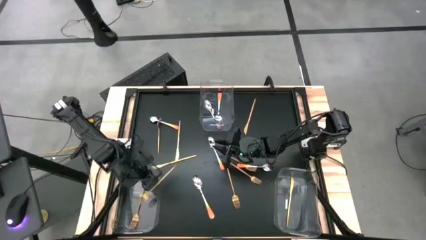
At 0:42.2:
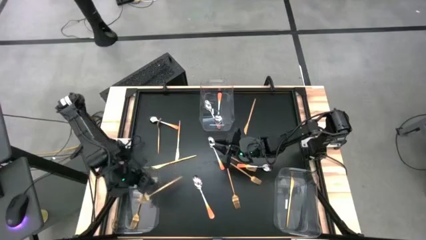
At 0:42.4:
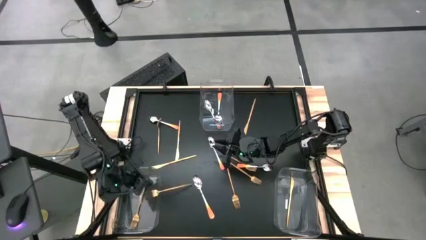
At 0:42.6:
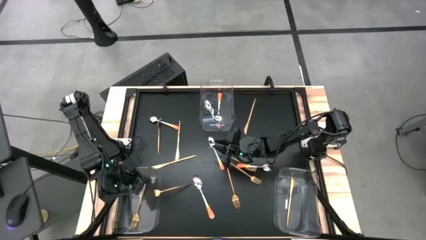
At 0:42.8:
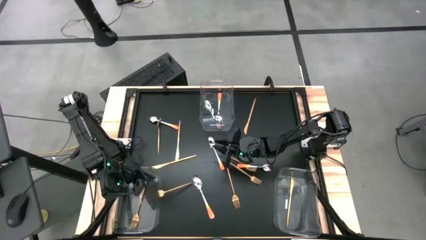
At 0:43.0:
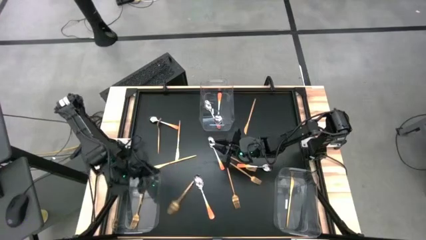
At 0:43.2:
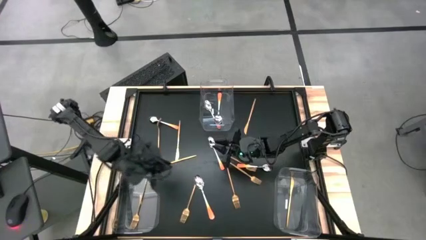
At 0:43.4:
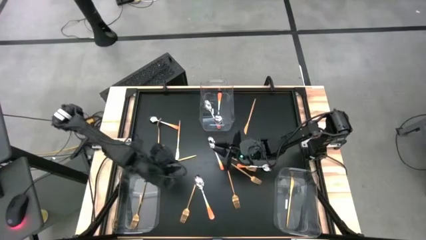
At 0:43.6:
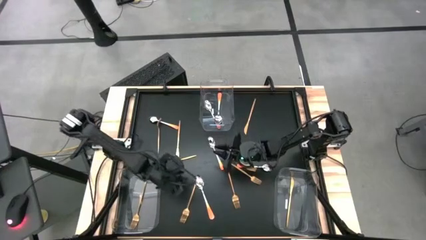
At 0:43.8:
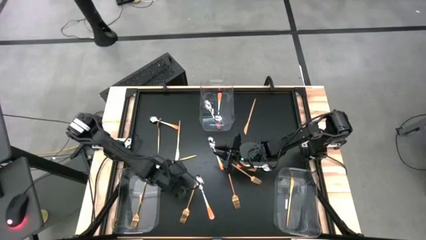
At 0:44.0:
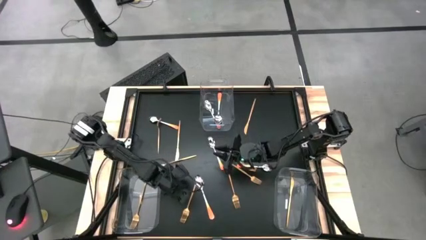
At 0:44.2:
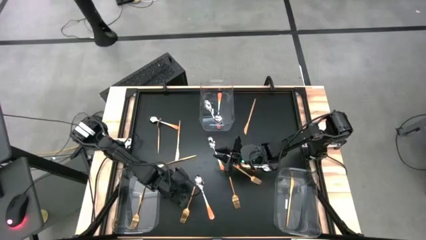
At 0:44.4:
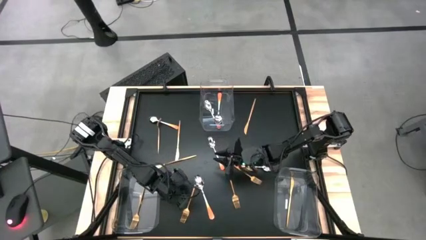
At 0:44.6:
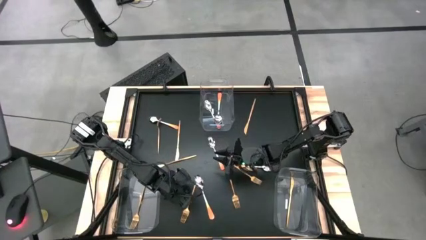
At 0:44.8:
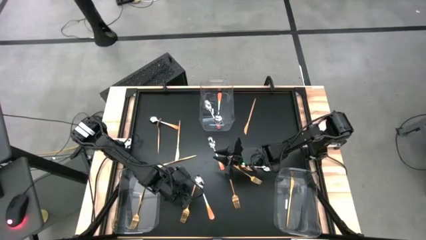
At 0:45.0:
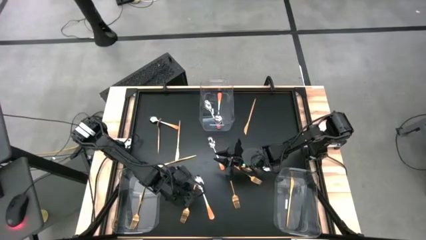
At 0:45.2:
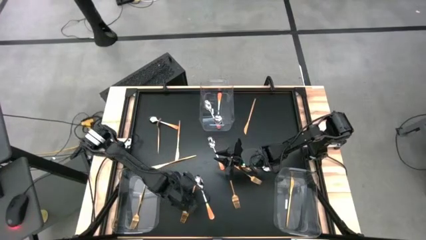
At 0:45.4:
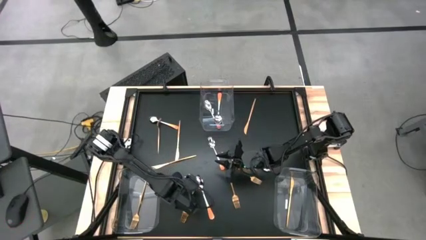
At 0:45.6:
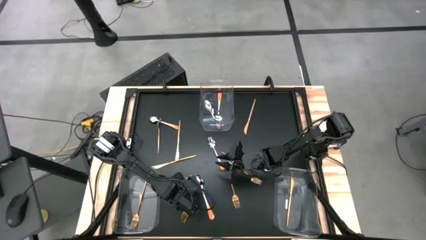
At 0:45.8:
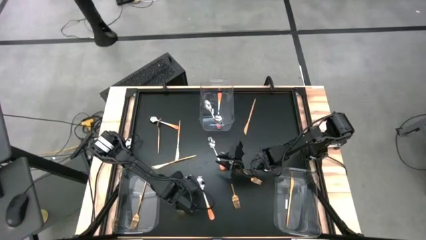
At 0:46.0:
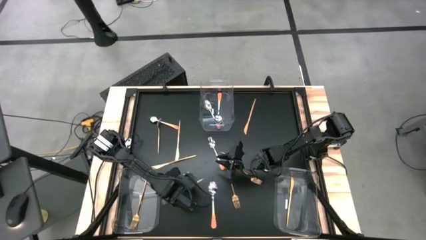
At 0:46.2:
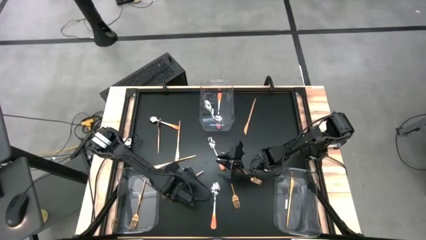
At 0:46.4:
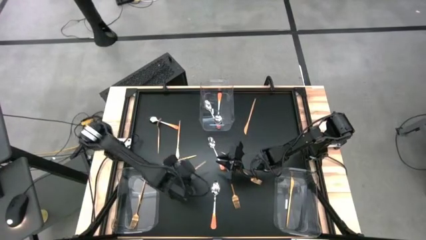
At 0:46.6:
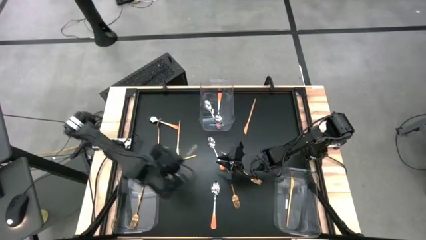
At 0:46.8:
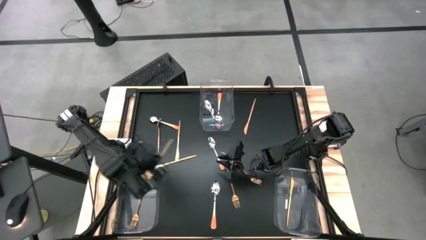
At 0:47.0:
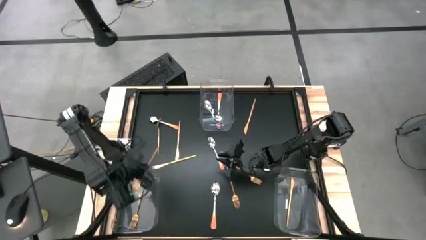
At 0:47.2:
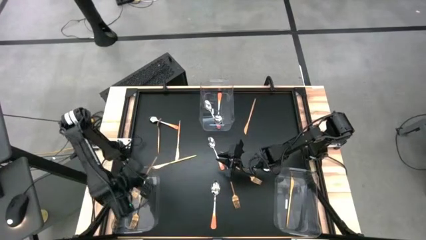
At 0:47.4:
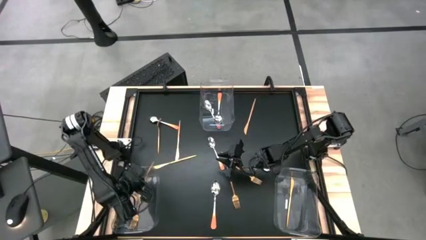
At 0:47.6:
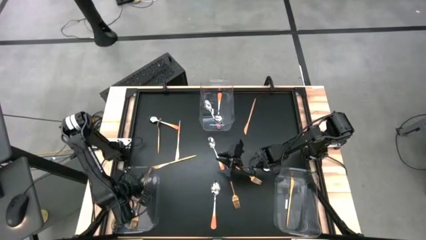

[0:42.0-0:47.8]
Task: Sort silverware by color (type)
Put the gold fork into the bottom left transparent bin

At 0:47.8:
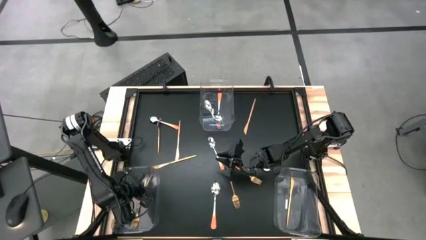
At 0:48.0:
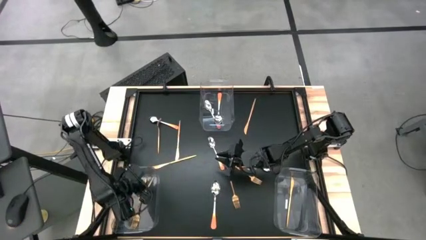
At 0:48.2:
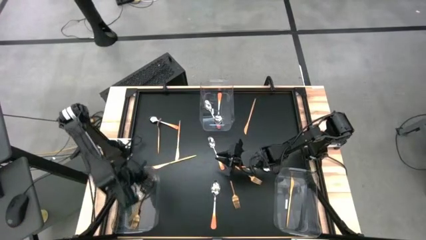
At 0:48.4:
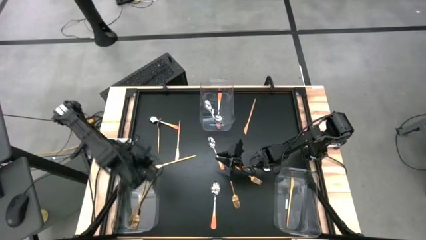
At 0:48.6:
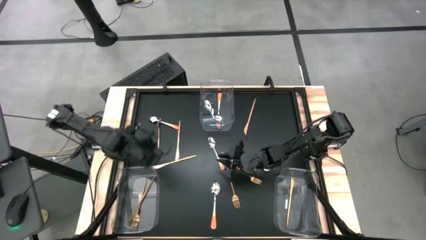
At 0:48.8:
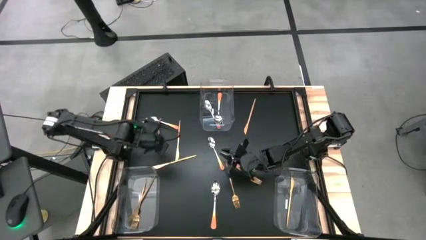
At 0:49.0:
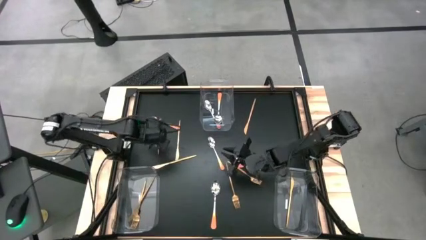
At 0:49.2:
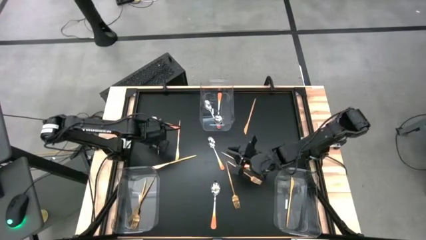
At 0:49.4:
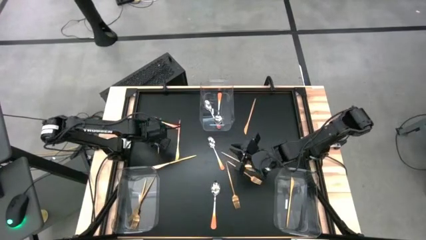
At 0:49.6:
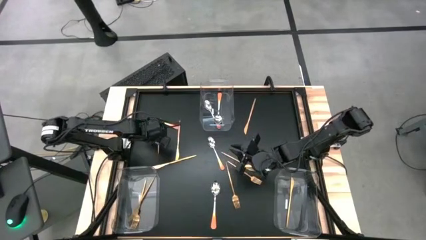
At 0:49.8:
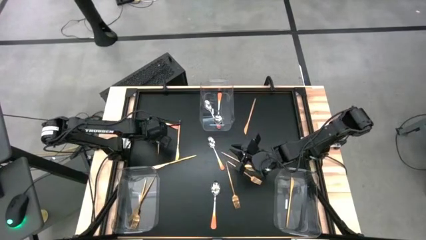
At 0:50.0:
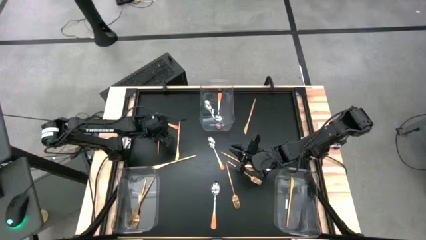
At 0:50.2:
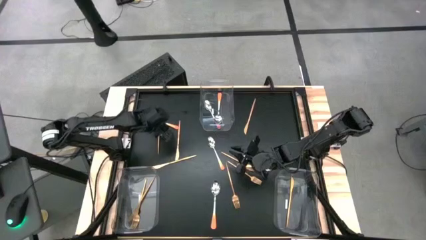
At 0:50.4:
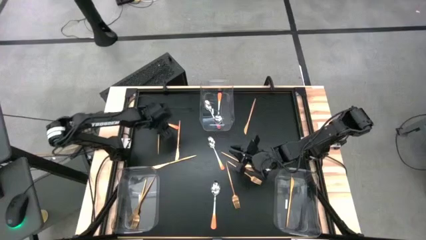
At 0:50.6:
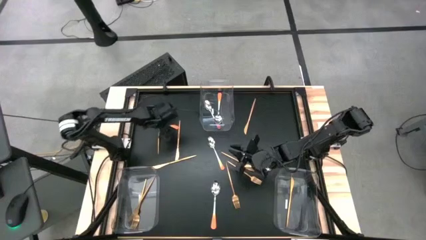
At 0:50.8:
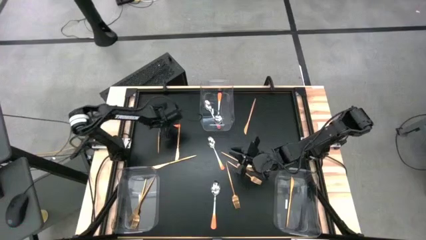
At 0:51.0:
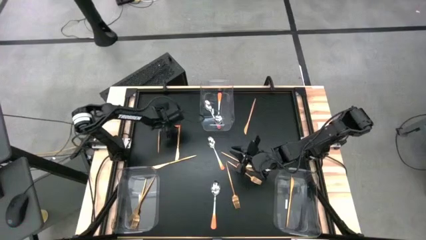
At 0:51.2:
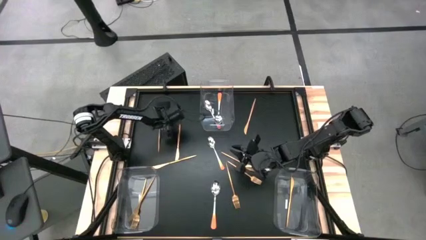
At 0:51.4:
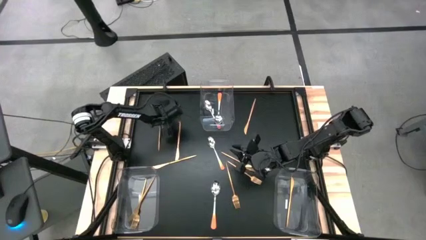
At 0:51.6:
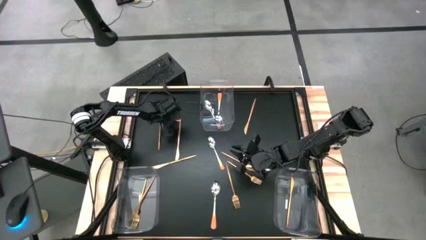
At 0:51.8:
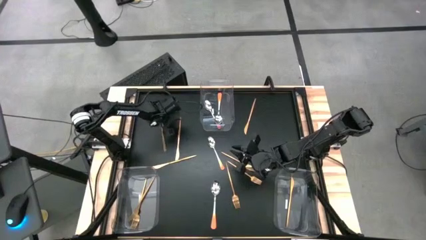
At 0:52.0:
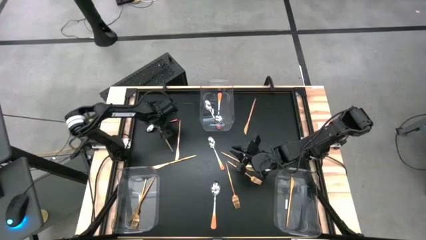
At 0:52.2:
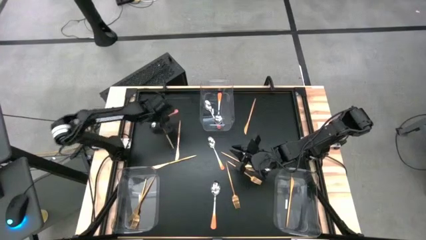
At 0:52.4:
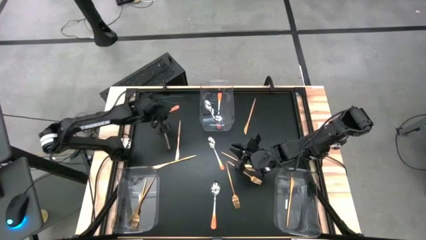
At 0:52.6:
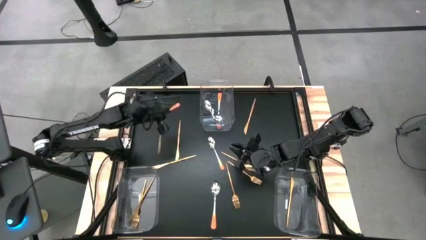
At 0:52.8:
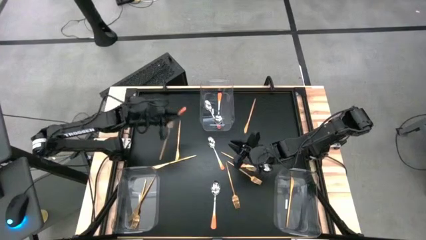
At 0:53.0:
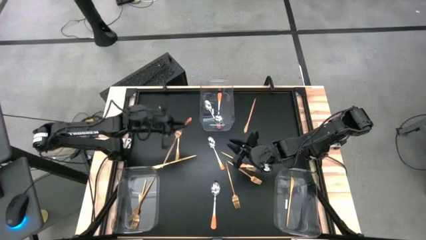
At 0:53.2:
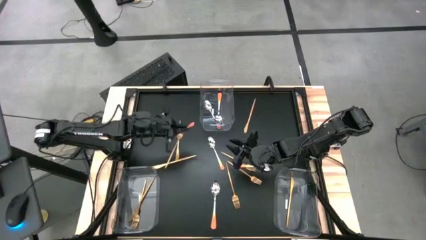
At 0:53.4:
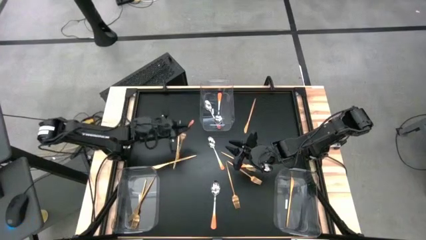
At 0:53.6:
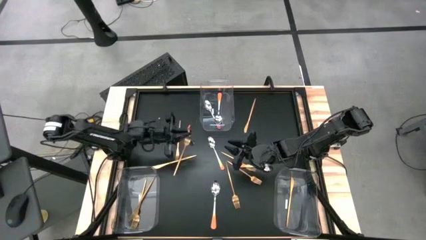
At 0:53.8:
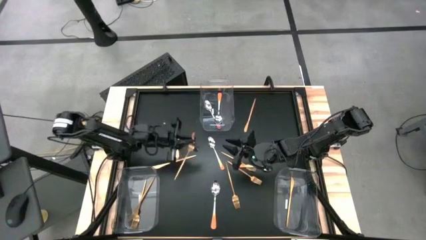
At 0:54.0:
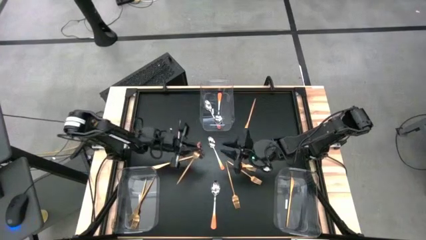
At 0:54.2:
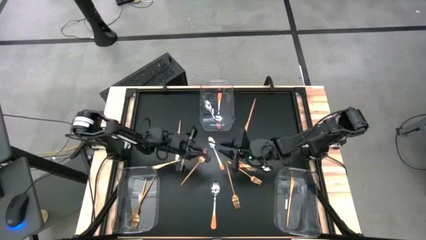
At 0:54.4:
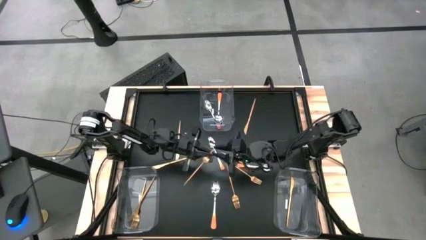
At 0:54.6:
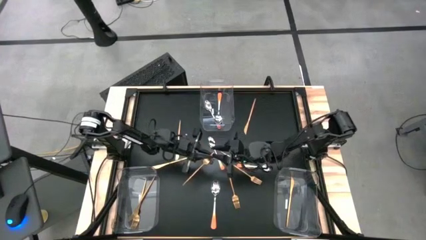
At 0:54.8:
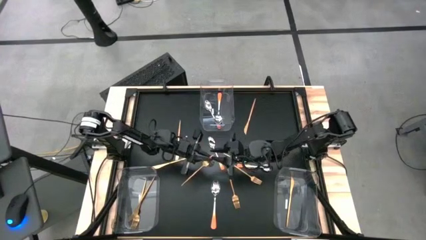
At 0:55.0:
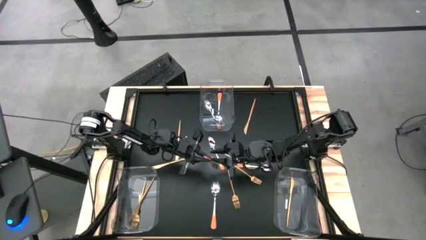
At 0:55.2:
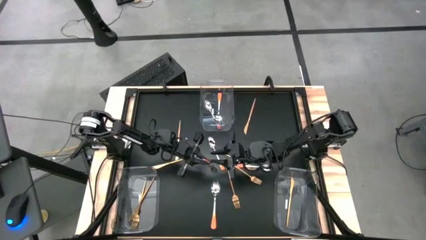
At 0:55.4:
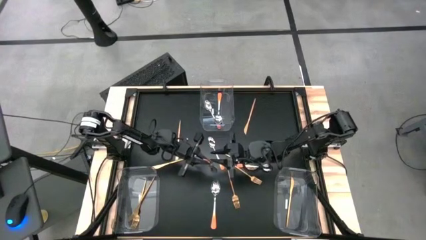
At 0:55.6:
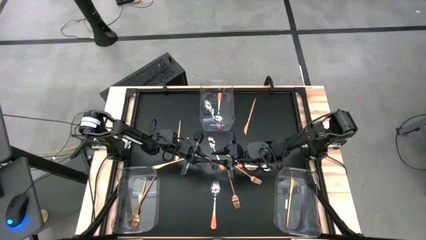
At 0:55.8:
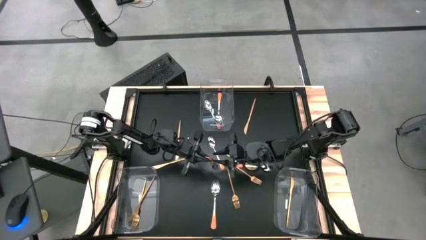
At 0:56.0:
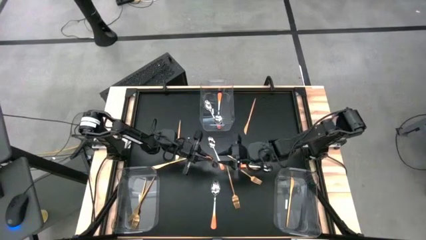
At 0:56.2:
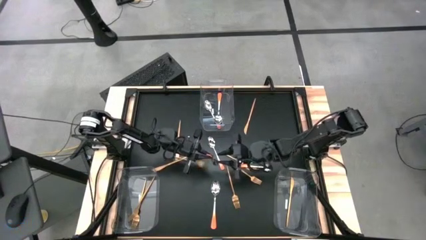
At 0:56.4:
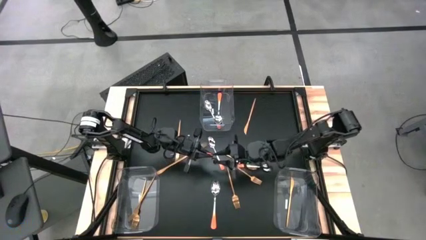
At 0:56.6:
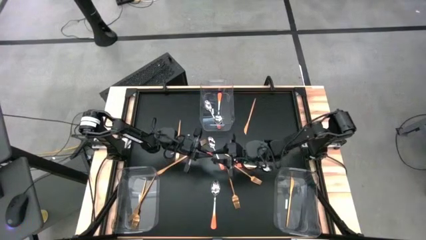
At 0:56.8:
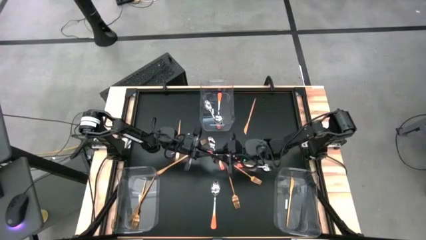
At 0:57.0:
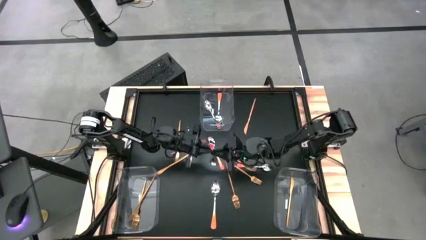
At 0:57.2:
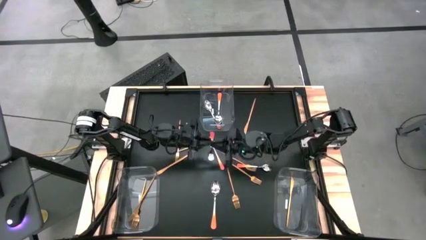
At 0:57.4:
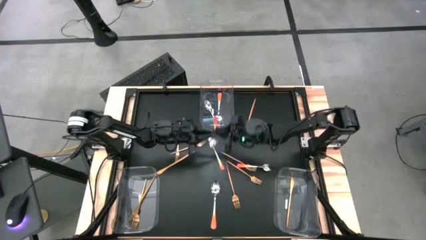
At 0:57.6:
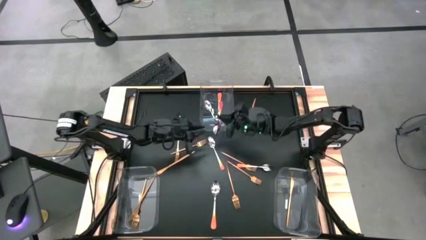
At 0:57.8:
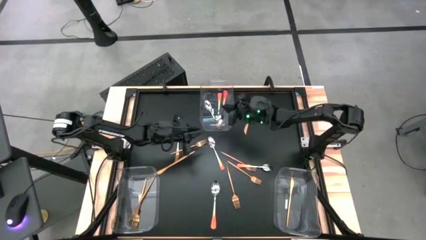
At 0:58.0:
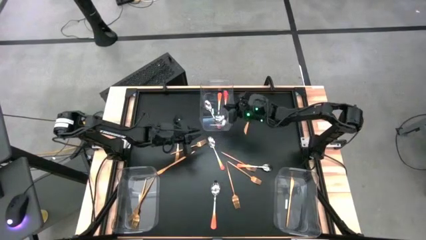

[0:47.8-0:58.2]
Put the orange spoon into the top transparent bin
